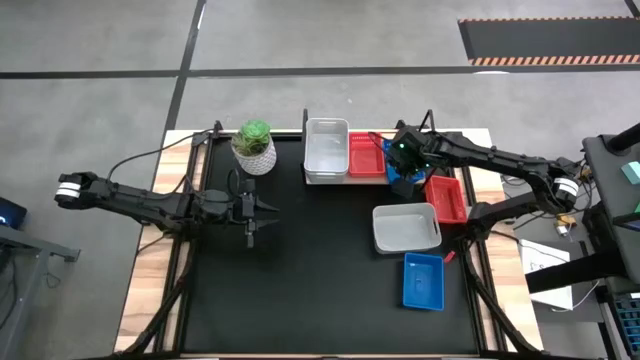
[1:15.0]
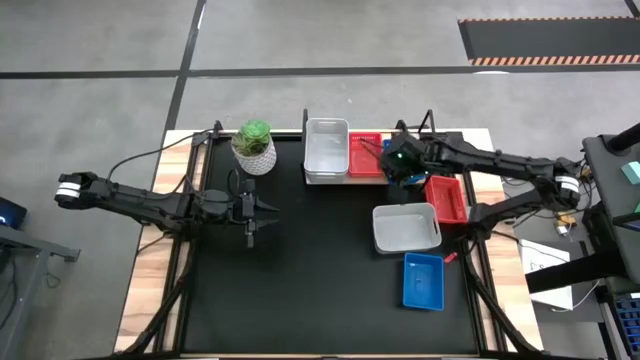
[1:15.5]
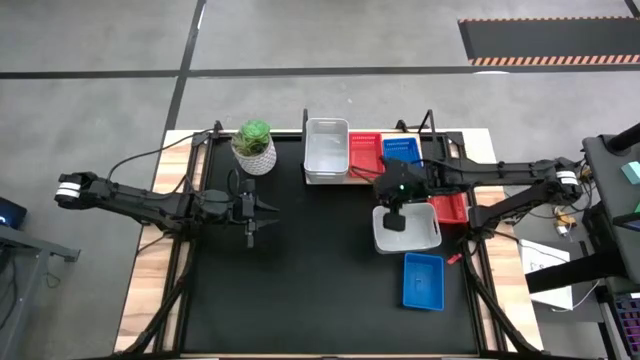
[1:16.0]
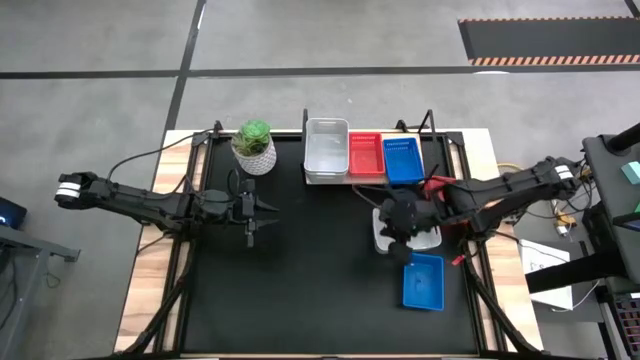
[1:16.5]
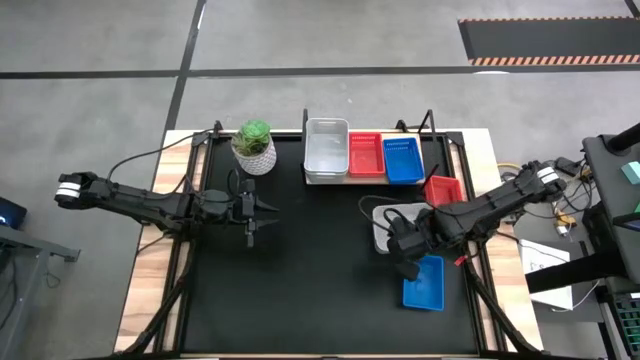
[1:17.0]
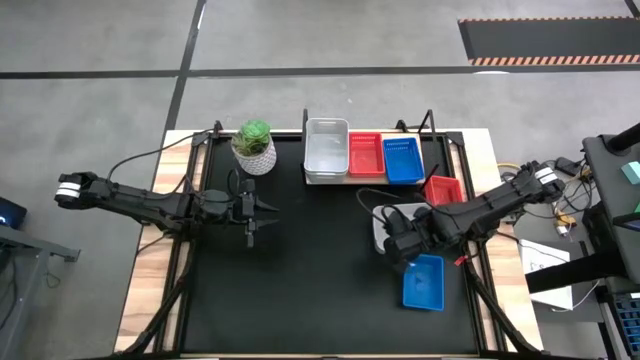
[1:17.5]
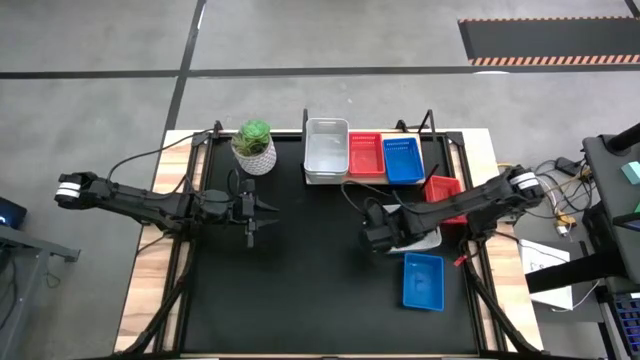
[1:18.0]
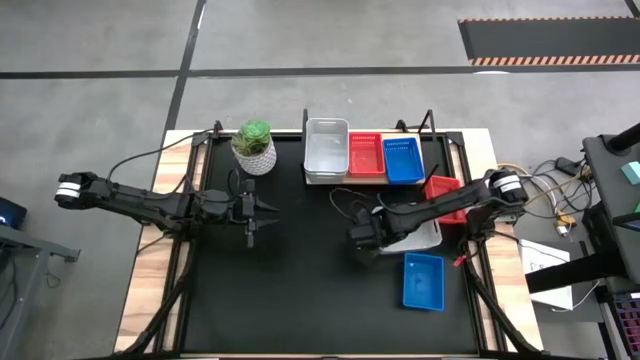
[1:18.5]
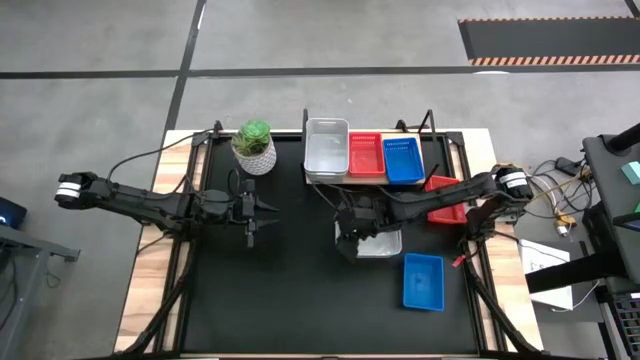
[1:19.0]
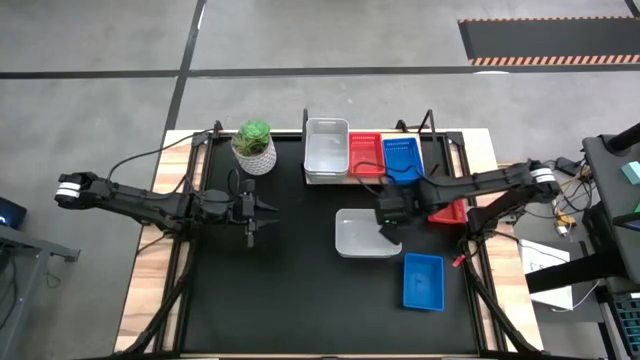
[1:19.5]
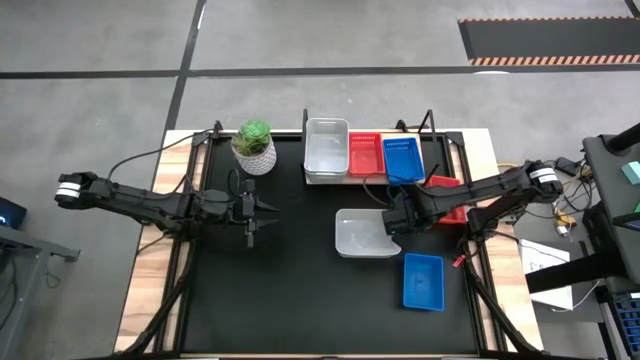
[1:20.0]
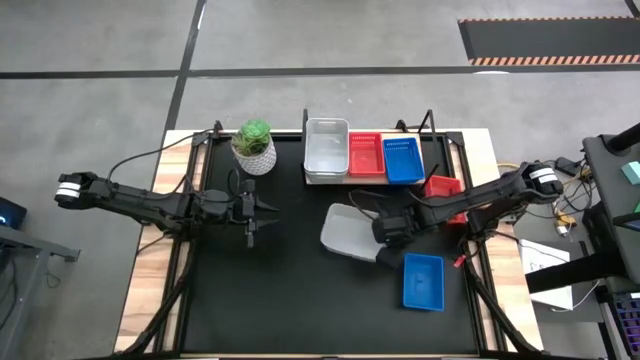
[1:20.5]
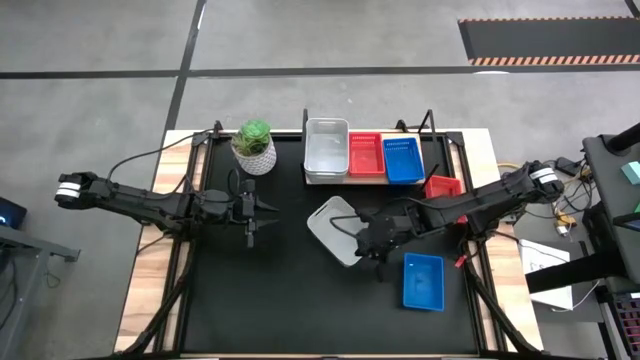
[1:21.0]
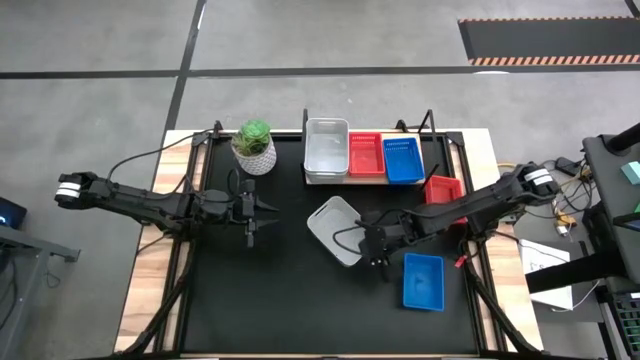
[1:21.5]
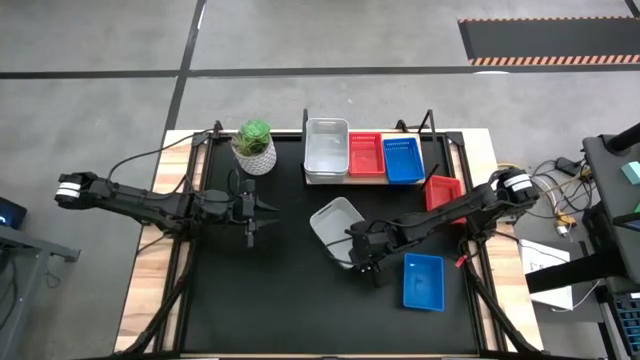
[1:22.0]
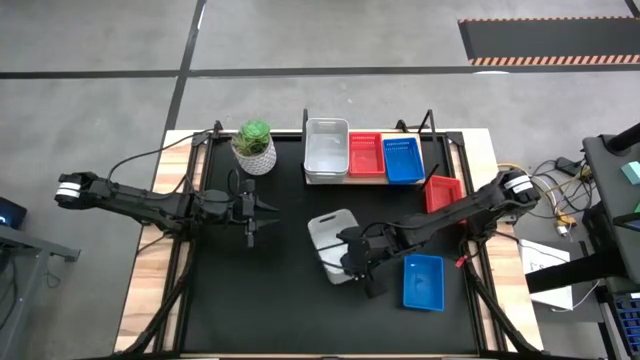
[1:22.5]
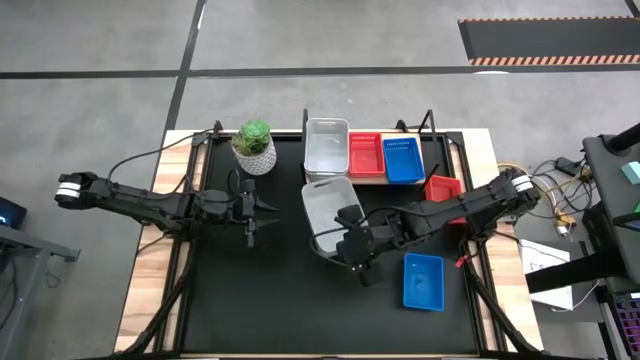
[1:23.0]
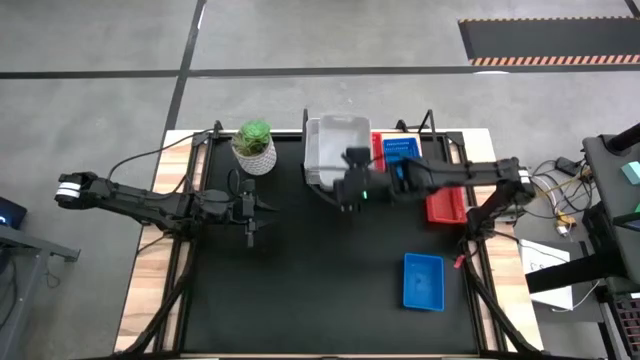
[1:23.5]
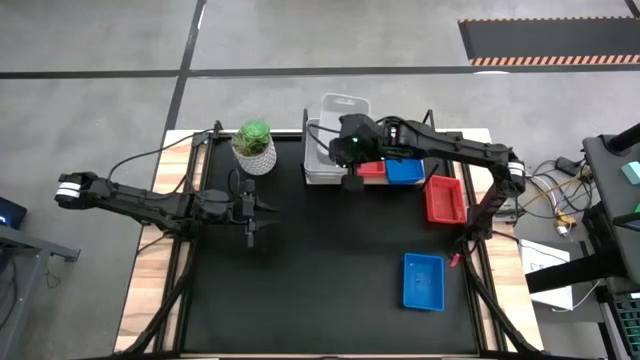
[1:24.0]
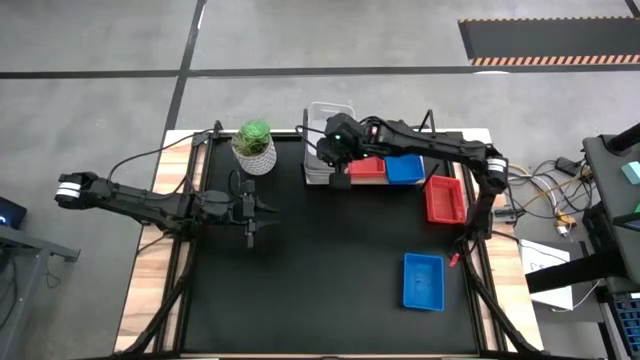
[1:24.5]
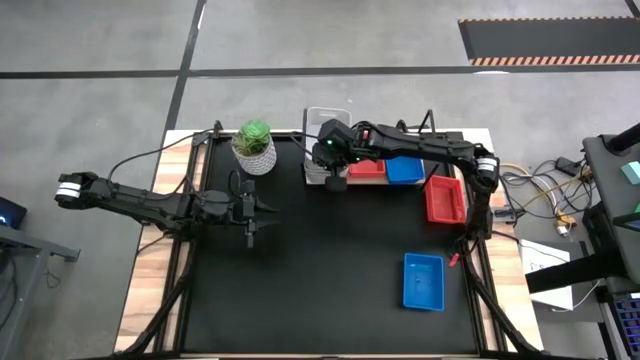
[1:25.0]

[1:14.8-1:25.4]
Task: Stack baskets on shelf by color
Stack the white bin on the white bin on the shelf

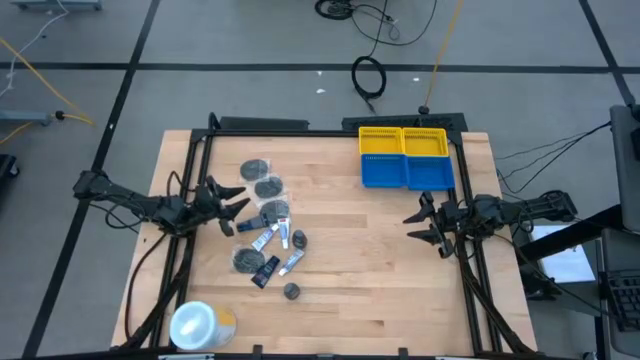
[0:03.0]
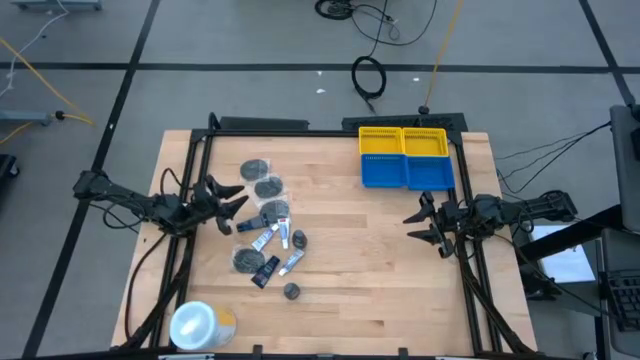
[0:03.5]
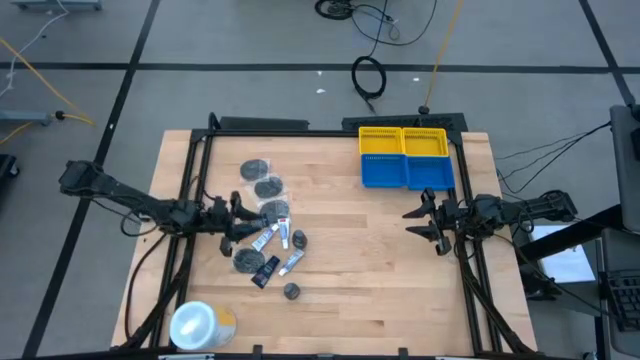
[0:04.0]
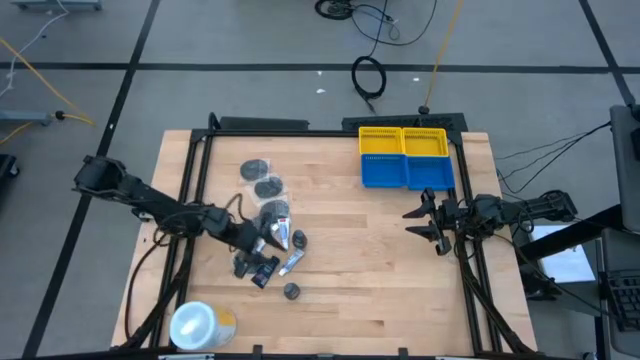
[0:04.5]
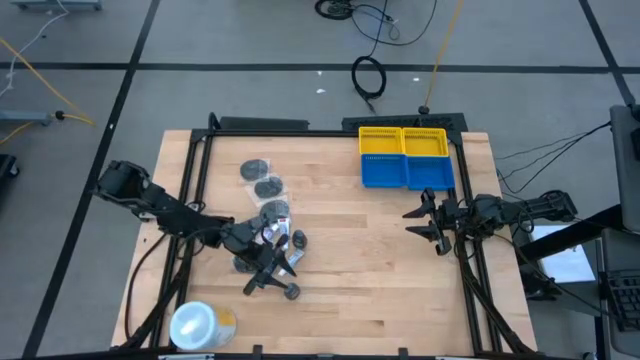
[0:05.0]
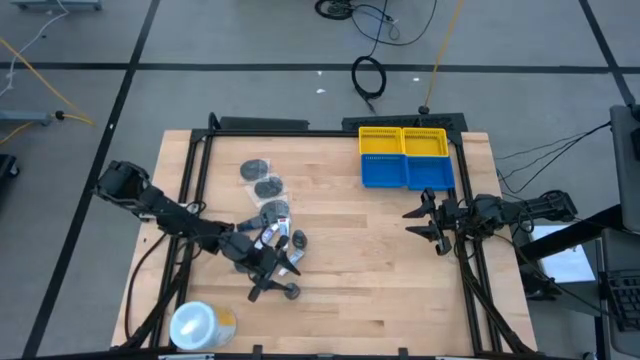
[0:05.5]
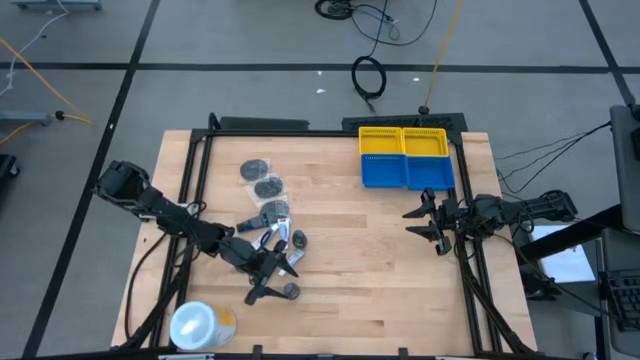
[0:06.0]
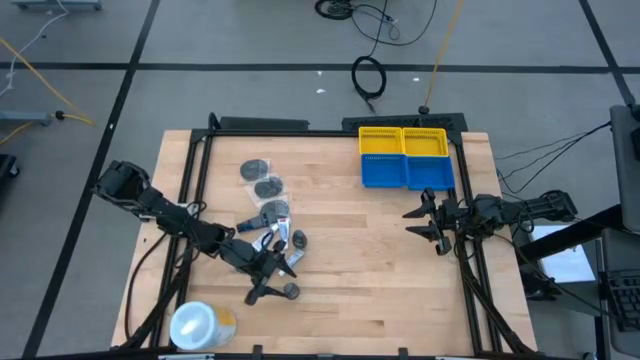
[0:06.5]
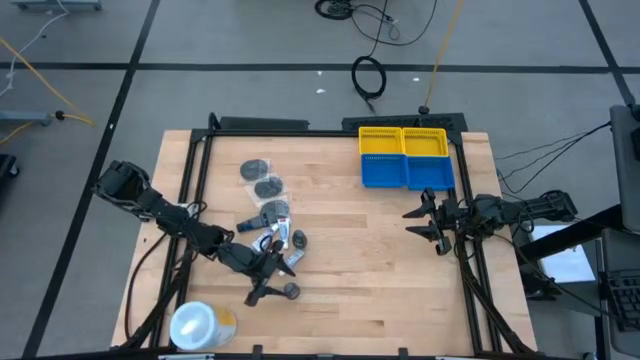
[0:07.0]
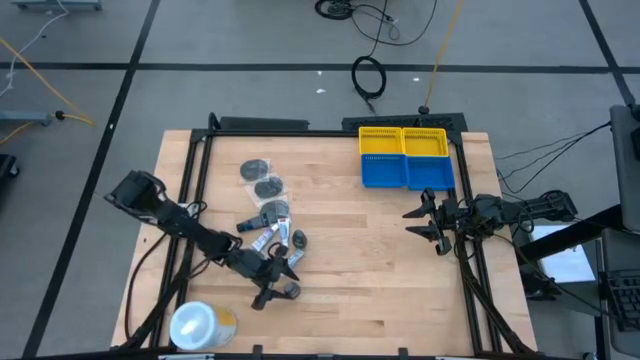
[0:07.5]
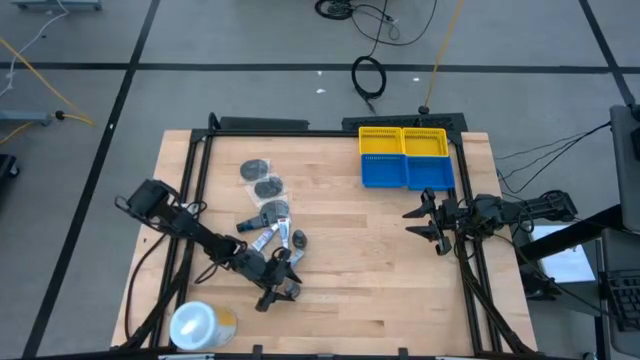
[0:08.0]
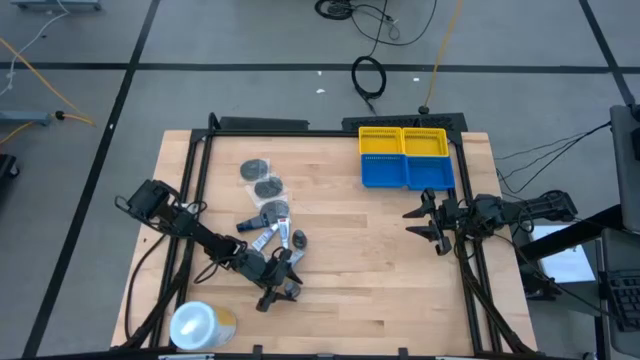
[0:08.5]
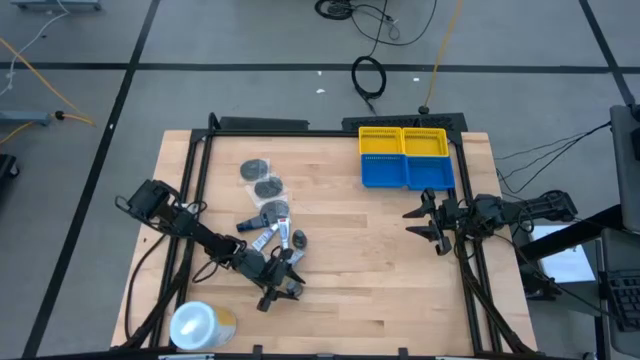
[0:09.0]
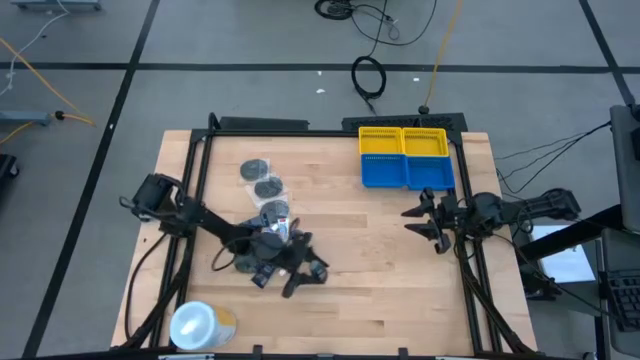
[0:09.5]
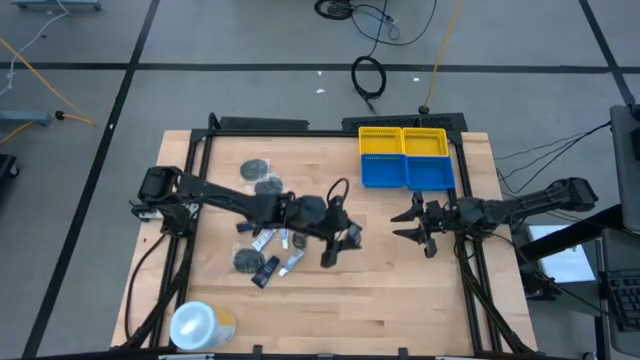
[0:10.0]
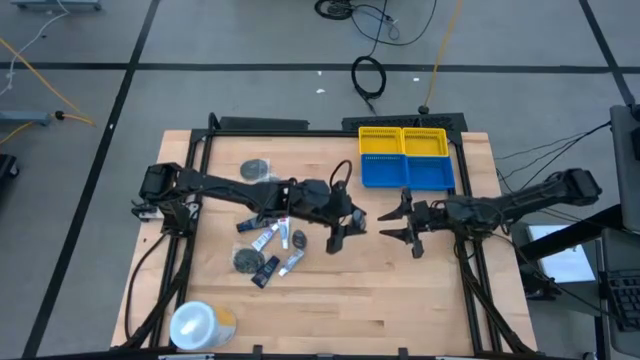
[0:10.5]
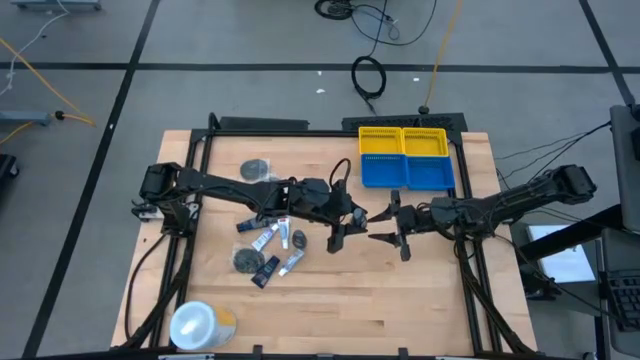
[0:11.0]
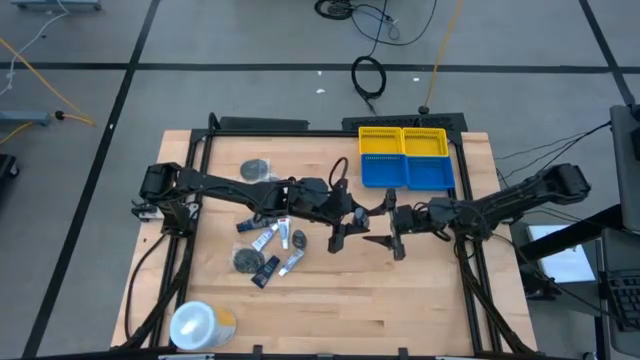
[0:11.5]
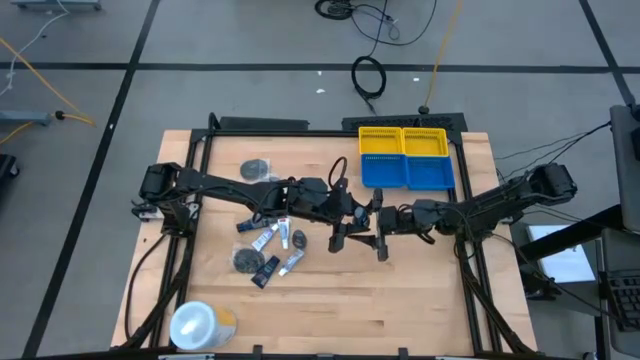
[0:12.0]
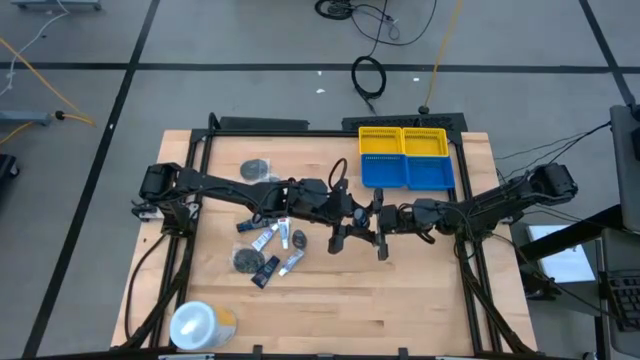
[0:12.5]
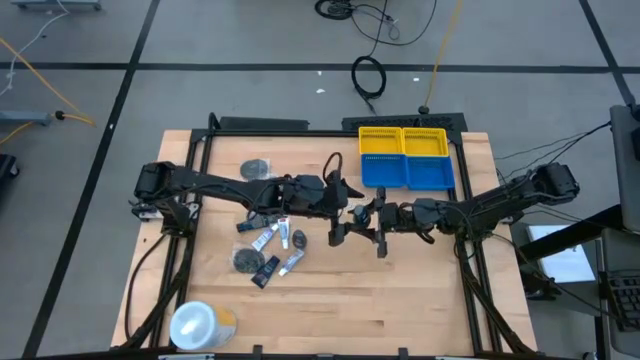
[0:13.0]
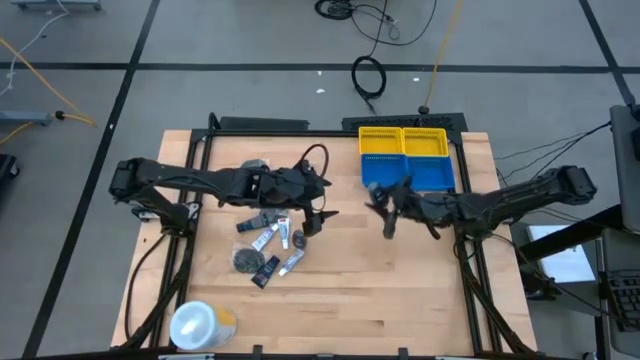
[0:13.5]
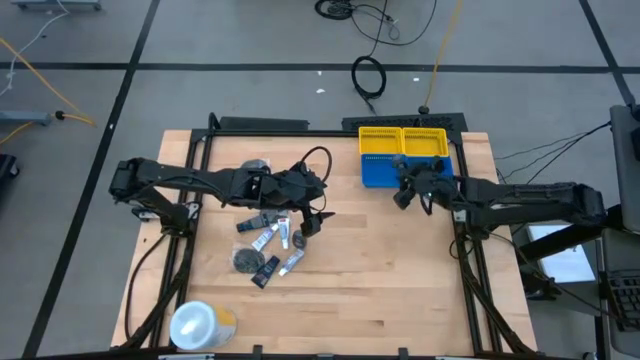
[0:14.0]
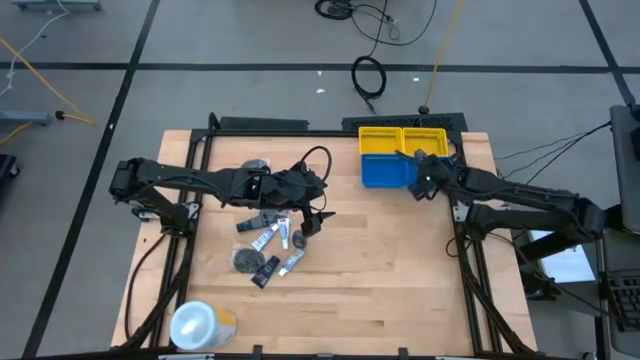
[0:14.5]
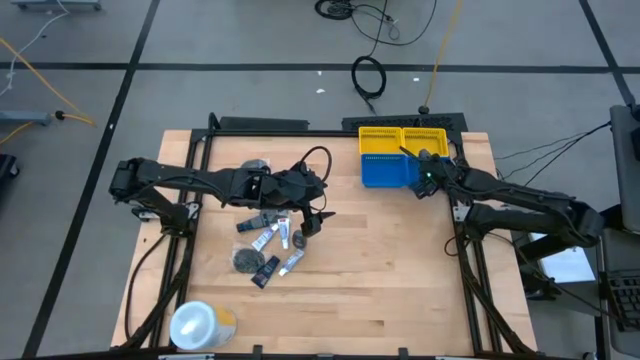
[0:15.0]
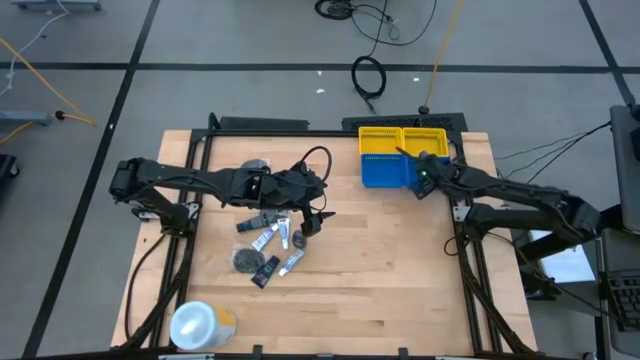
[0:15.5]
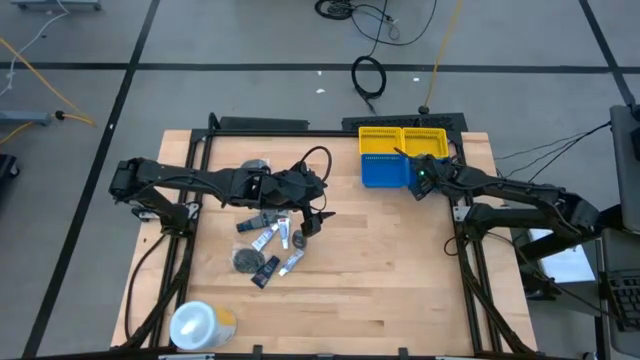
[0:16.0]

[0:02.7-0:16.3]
Task: Pick & Place Travel size toiletries
Put the gray deodorant into the right blue basket
